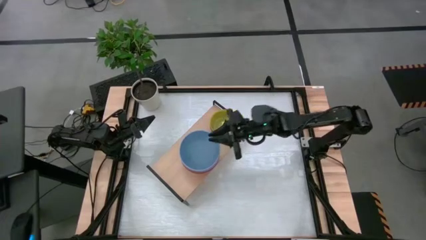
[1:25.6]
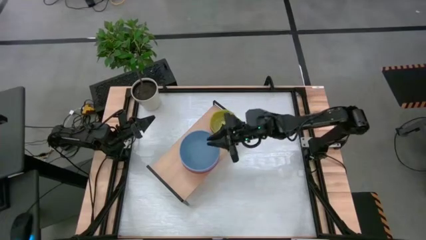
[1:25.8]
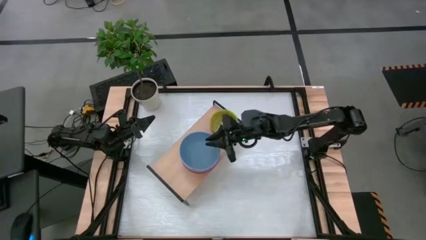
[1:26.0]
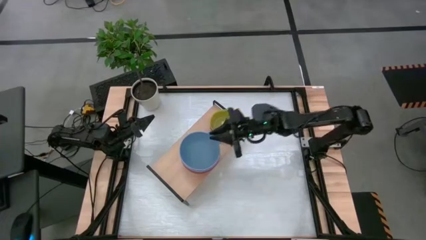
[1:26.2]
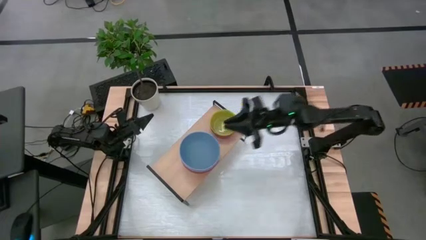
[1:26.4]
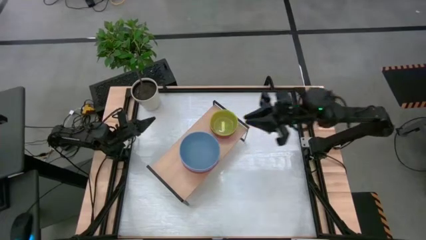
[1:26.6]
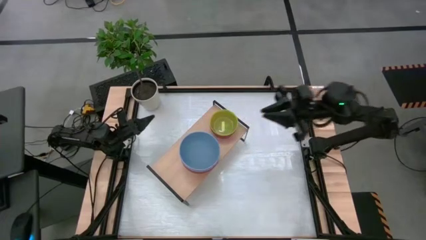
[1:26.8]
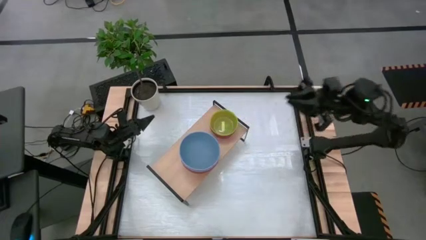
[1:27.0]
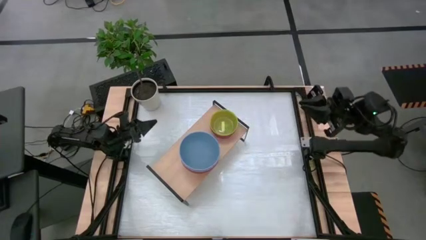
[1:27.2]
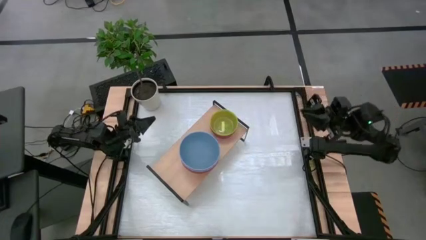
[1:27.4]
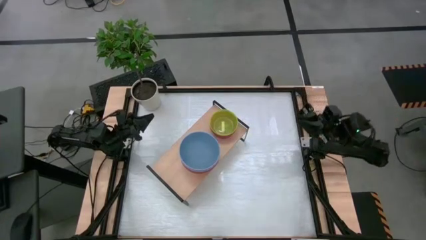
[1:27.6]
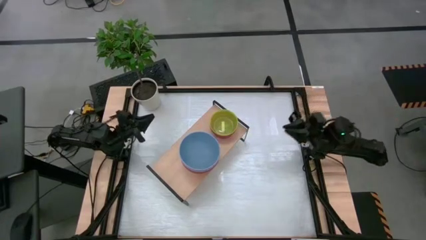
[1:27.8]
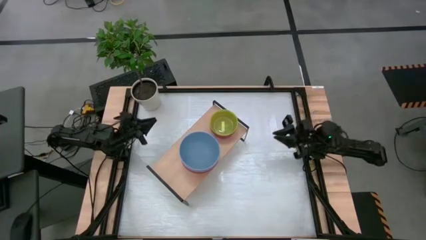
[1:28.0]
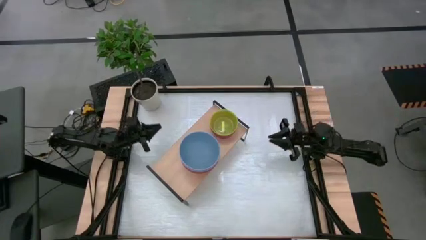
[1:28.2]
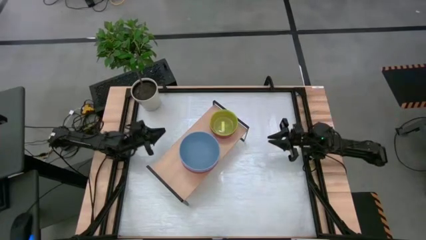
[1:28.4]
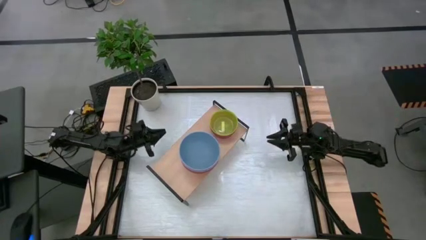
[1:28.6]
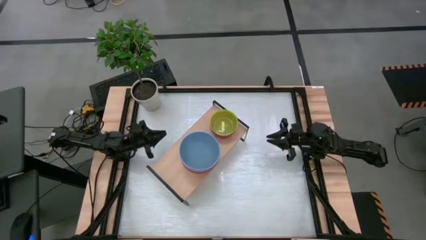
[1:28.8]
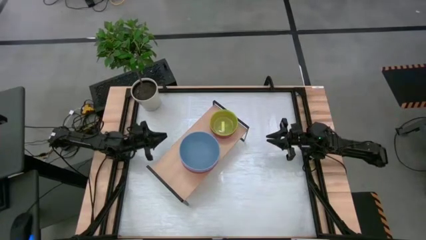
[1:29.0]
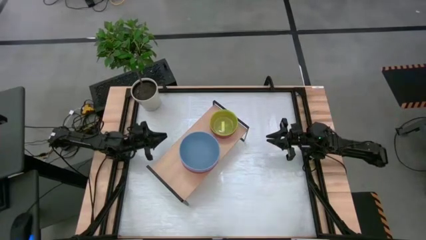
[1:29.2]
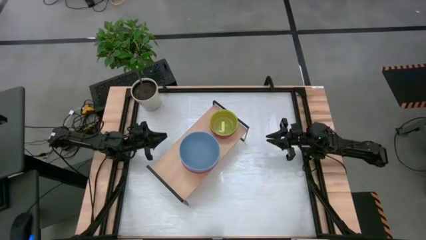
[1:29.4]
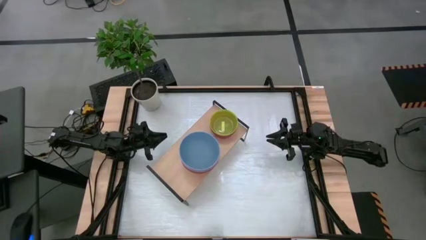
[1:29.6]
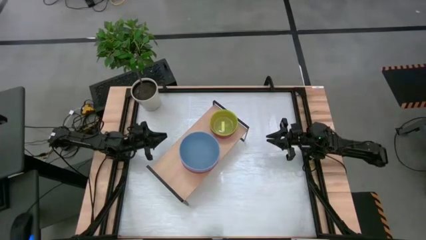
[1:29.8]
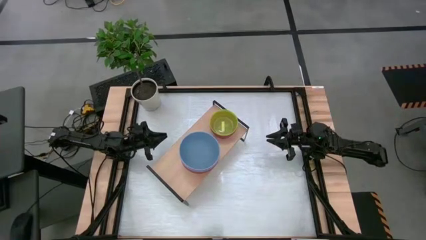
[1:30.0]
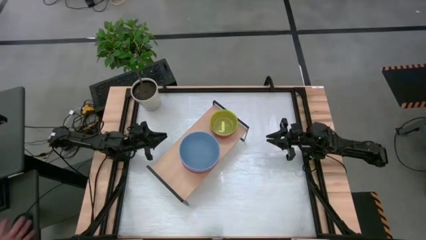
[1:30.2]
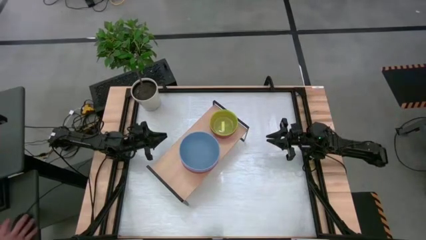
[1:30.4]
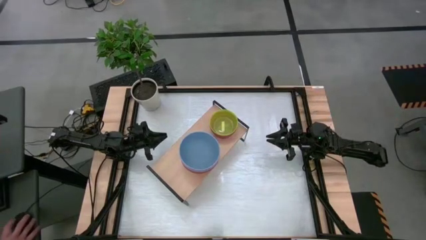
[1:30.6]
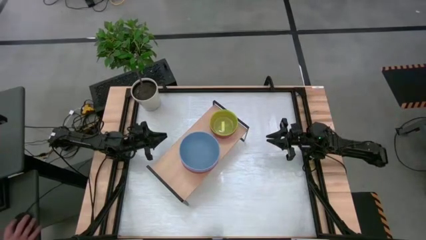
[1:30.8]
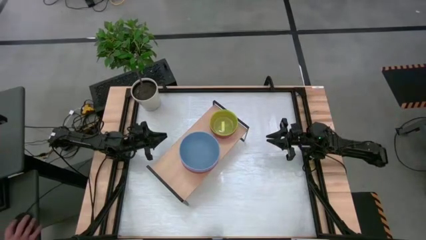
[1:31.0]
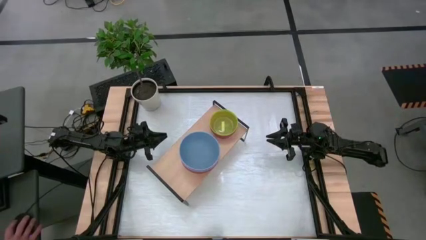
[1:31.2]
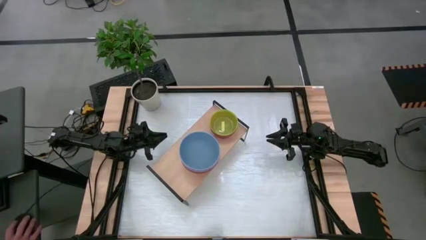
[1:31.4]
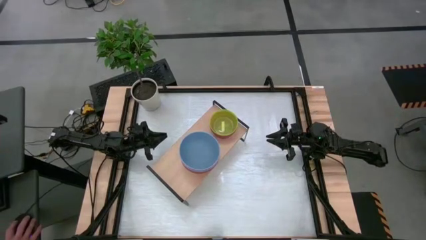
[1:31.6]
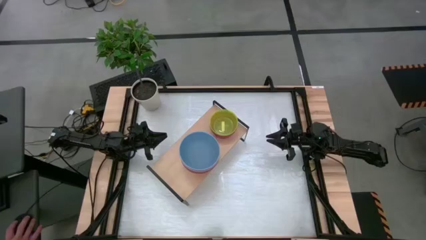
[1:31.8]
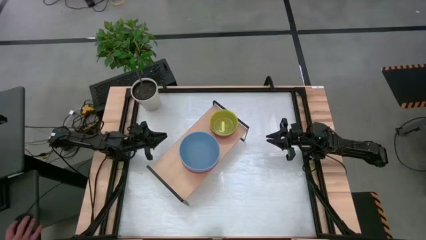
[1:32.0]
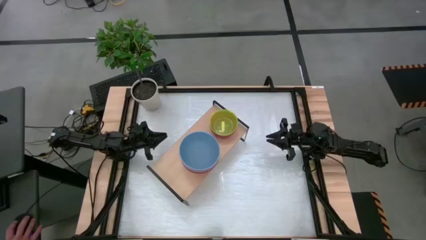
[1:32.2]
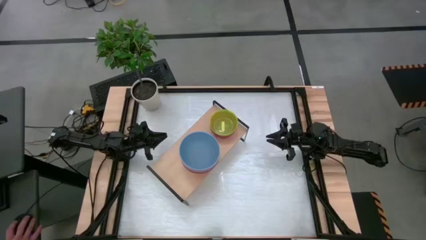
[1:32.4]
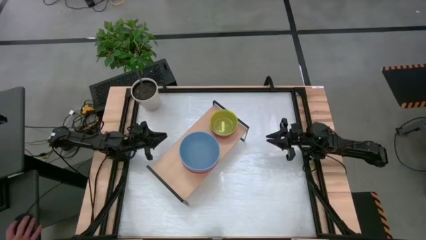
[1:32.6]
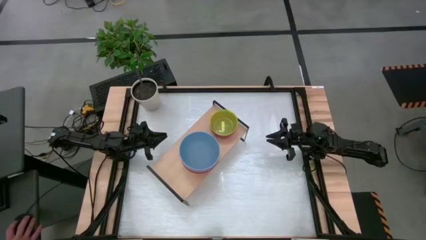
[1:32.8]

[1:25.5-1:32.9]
Task: Place and stack bowls onto a shelf
Return to Home Position
